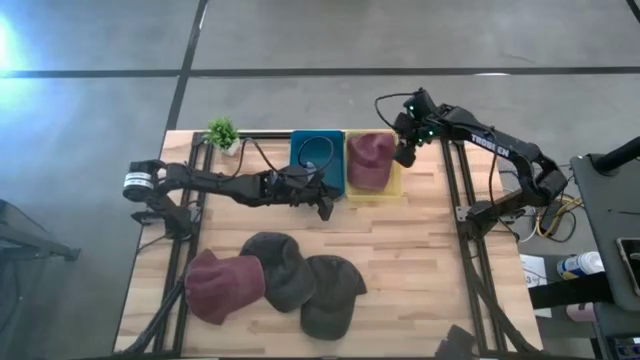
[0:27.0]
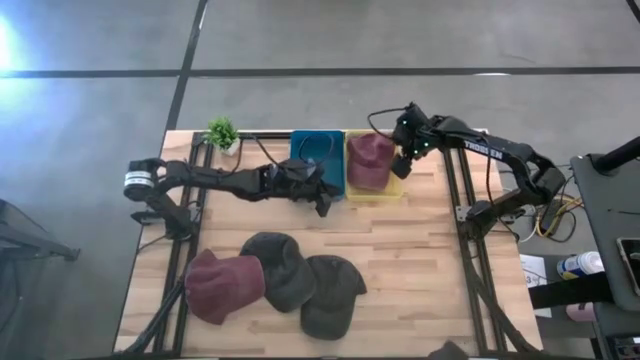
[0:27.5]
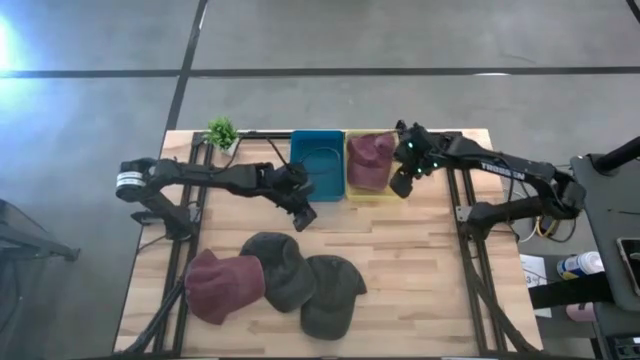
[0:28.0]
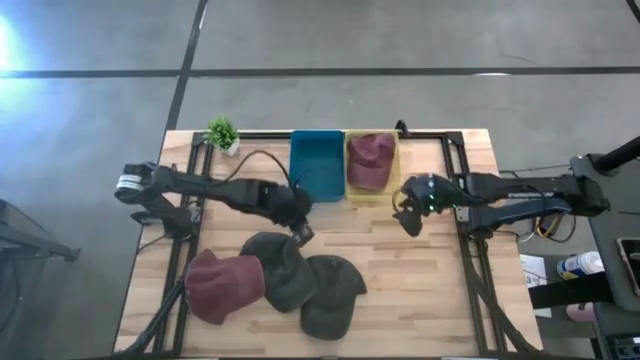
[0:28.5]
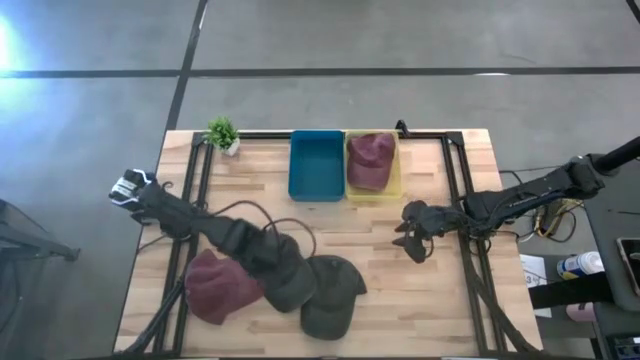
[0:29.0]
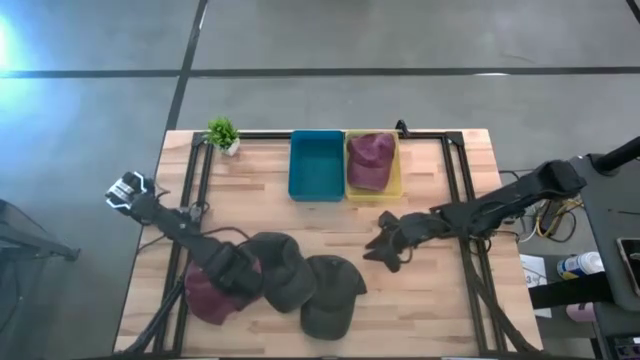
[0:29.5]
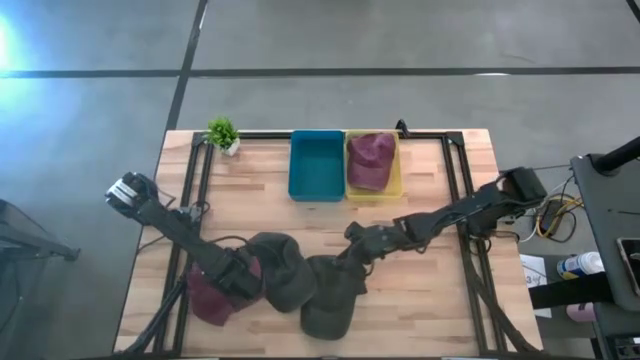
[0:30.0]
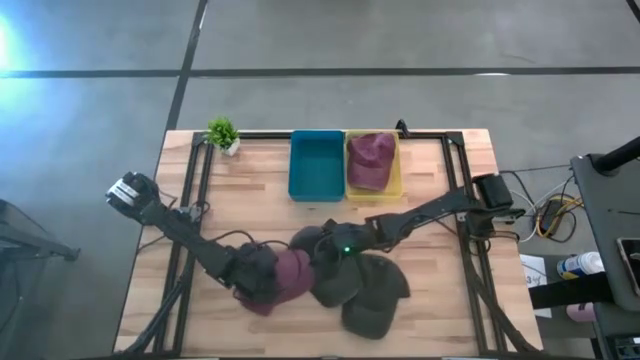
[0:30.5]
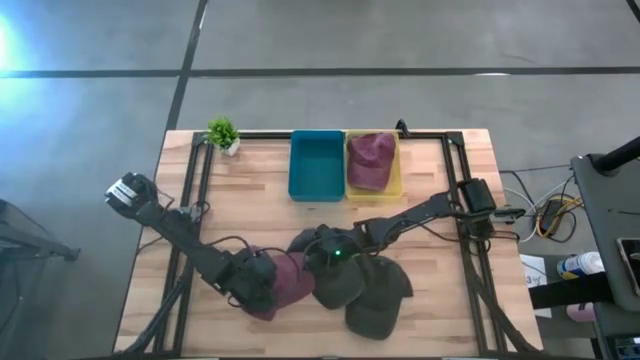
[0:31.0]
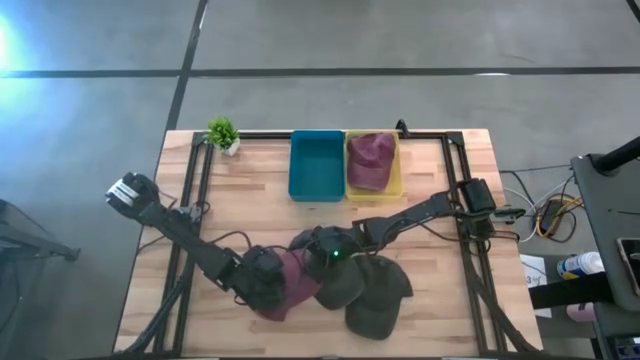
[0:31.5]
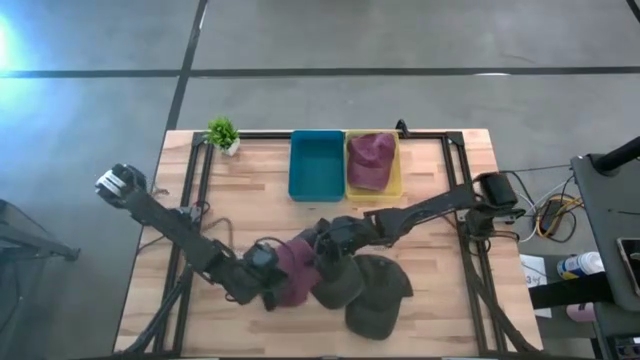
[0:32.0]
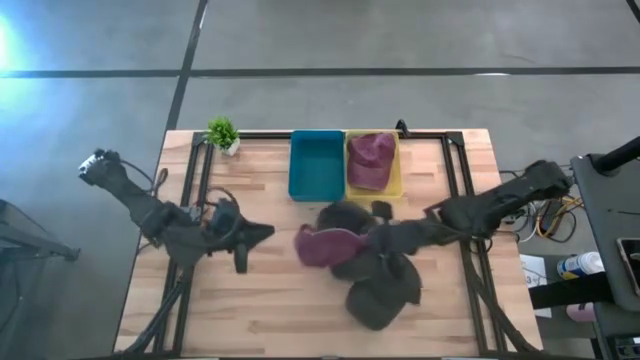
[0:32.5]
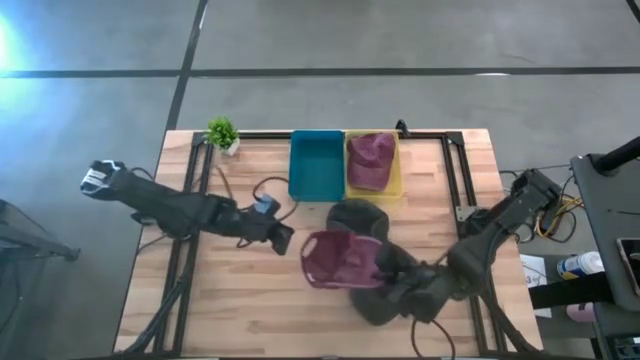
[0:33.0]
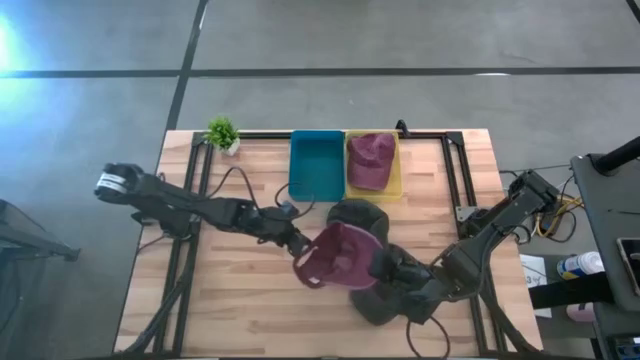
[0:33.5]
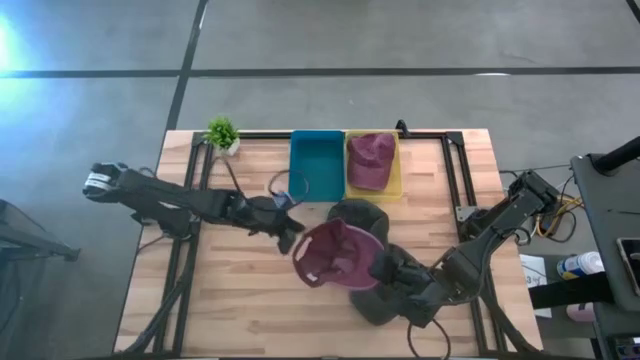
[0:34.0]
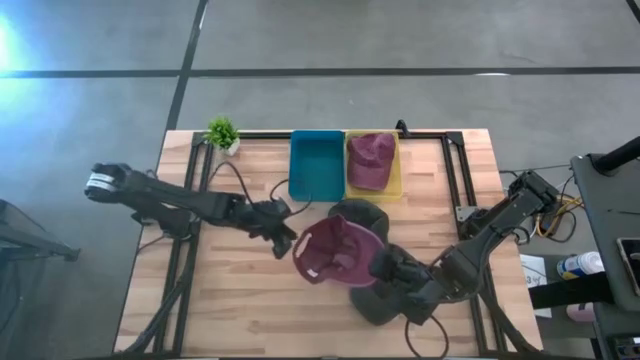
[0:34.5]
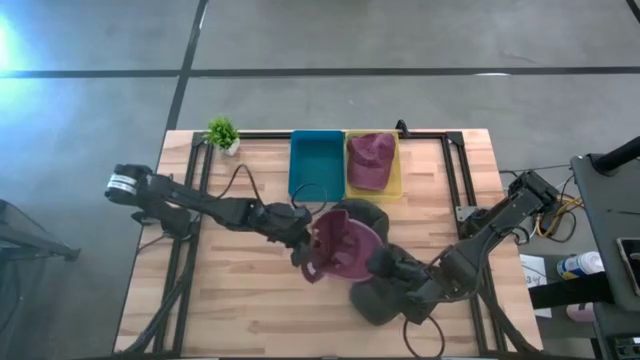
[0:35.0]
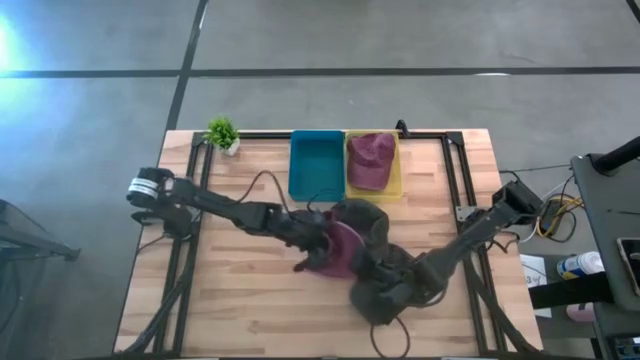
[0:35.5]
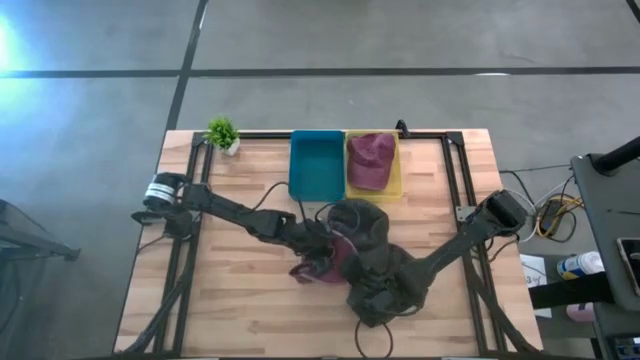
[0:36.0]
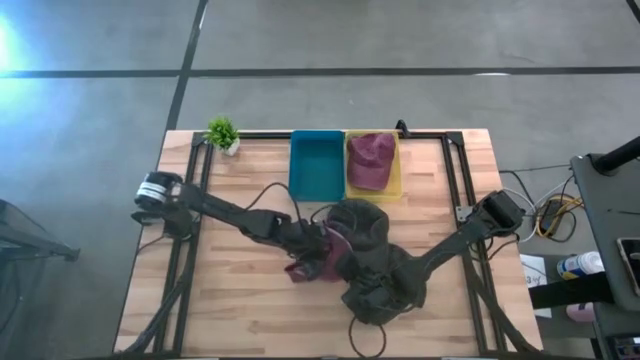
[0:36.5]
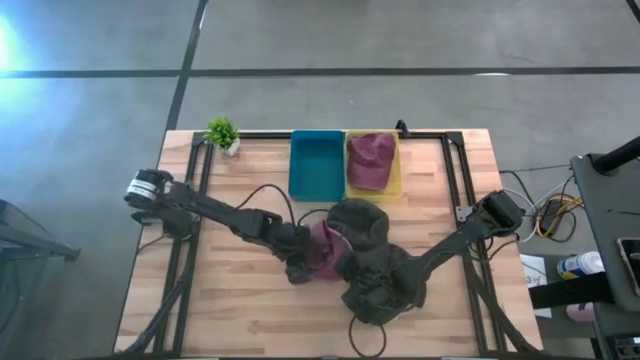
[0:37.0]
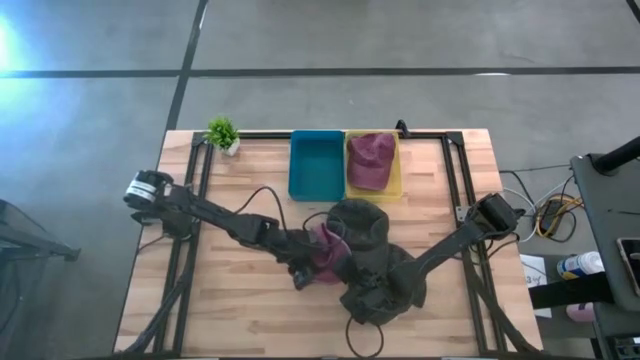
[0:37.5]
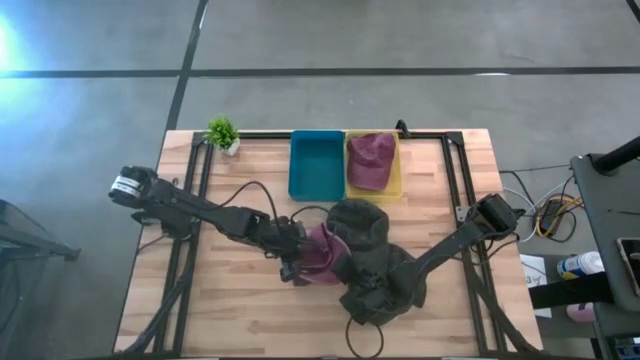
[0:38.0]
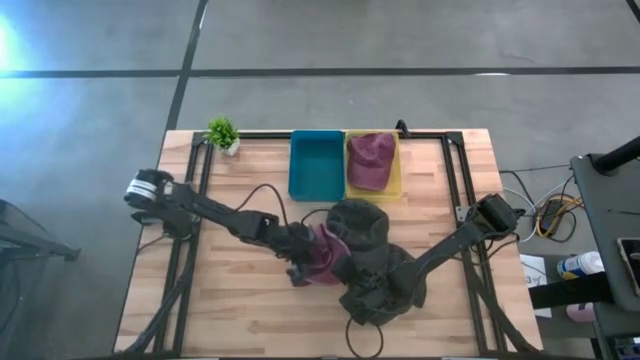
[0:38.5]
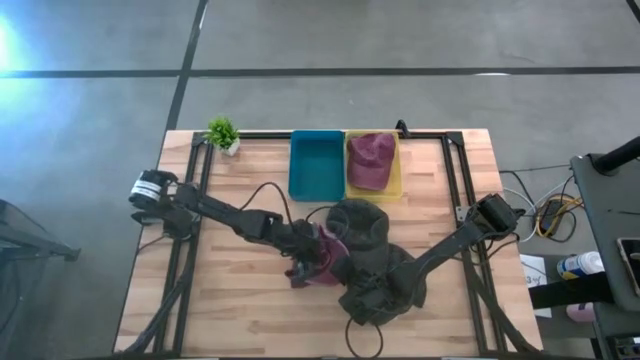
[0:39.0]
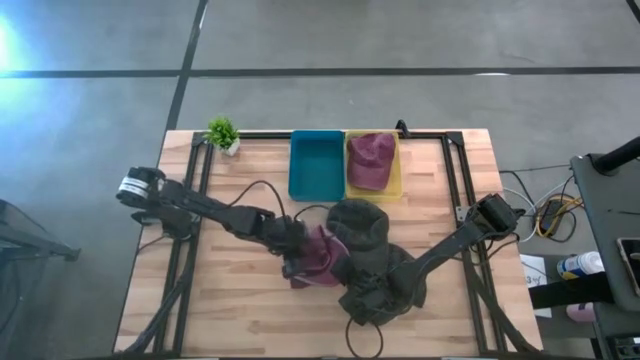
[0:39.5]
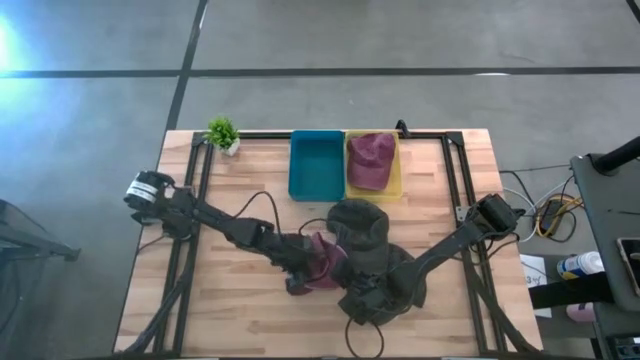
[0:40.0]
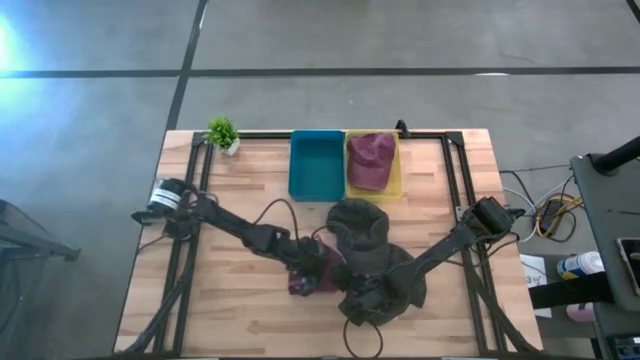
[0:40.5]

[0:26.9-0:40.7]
Task: Pick & Place hat
Put the red cap into the yellow bin

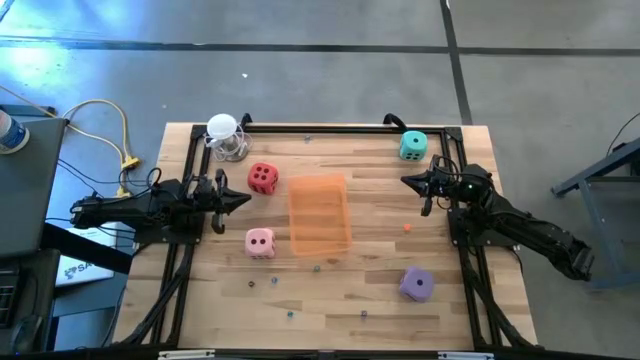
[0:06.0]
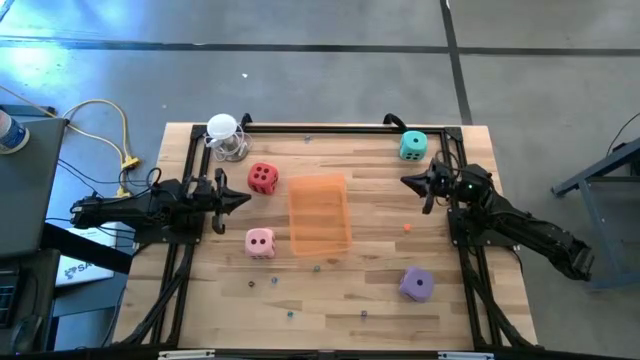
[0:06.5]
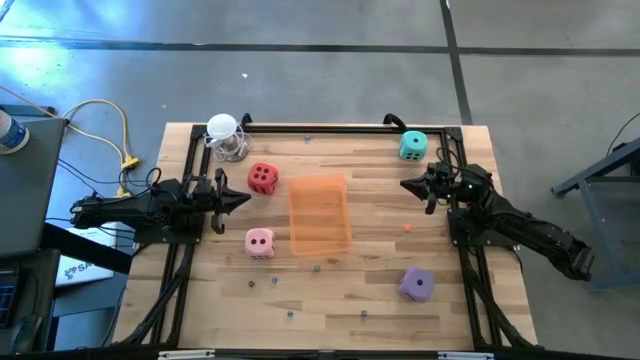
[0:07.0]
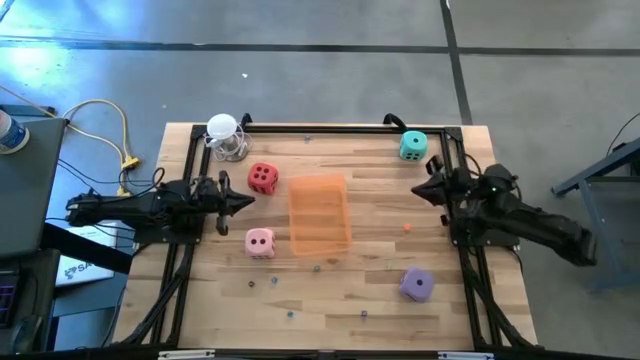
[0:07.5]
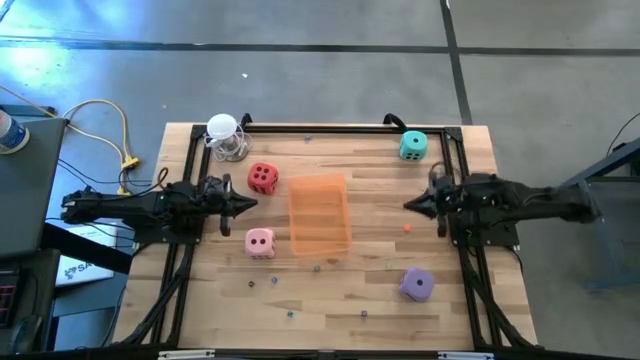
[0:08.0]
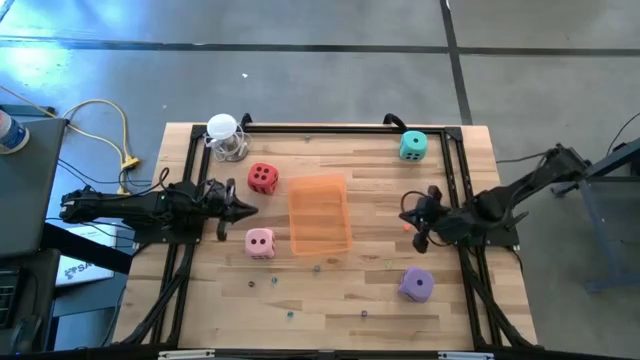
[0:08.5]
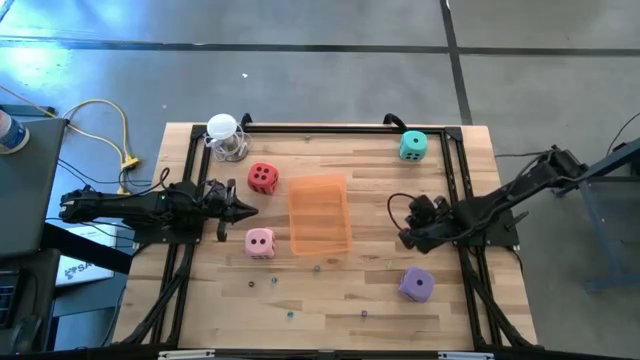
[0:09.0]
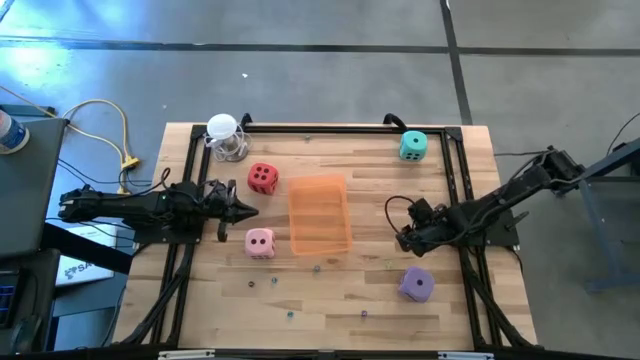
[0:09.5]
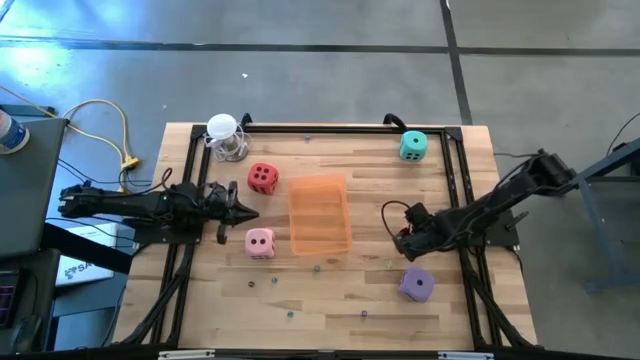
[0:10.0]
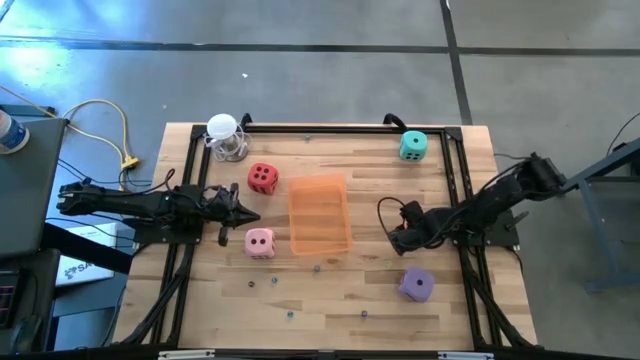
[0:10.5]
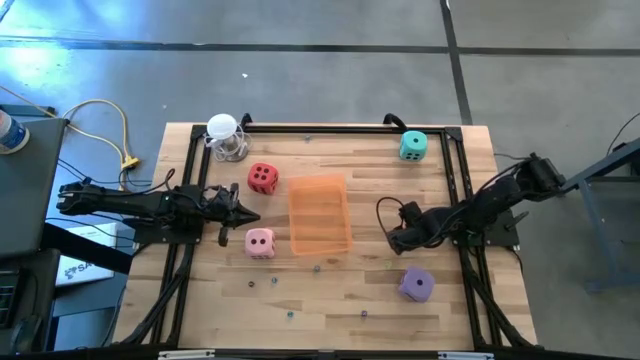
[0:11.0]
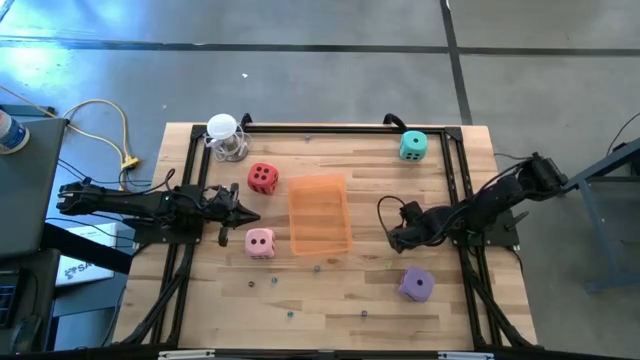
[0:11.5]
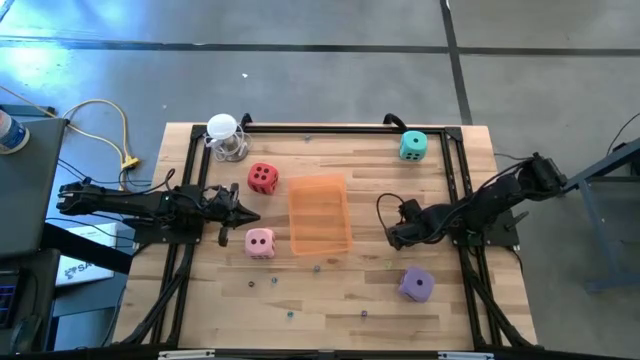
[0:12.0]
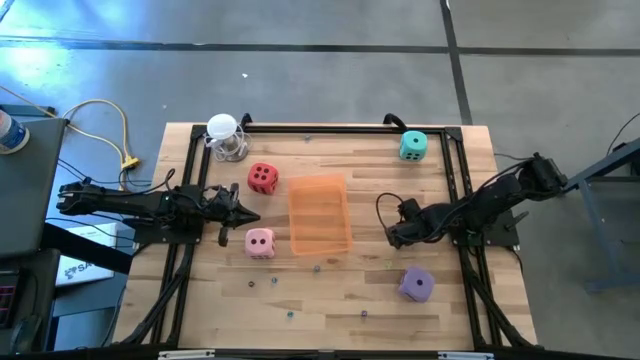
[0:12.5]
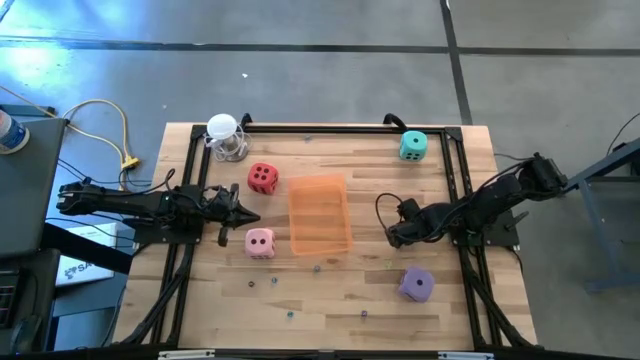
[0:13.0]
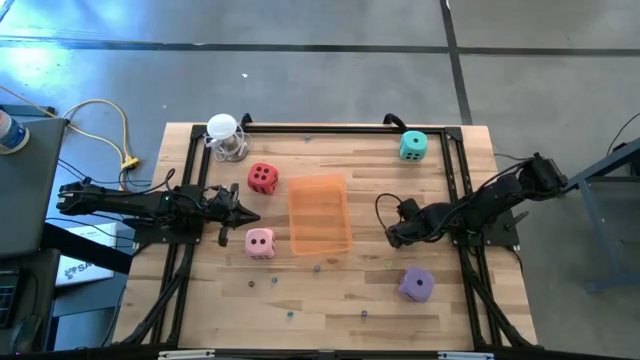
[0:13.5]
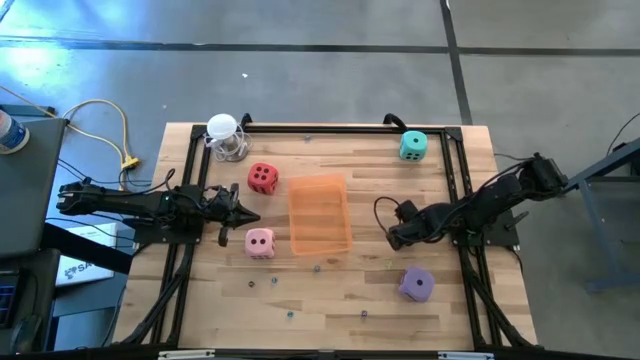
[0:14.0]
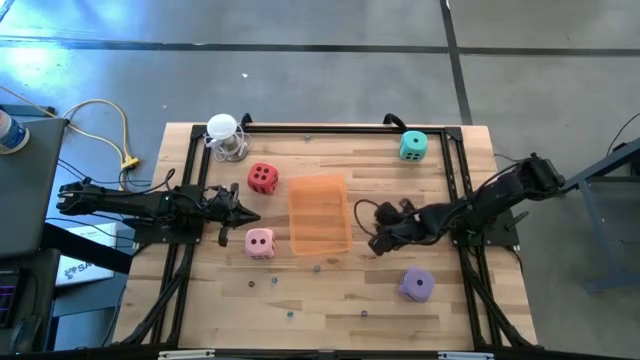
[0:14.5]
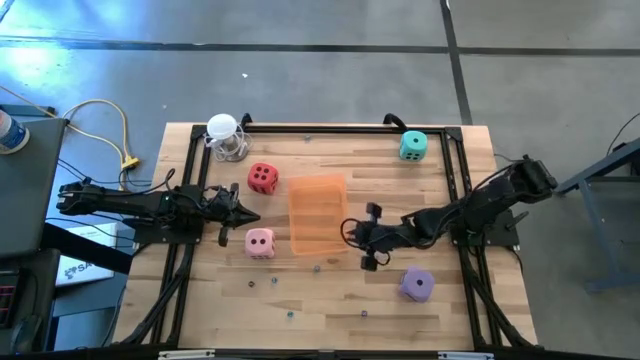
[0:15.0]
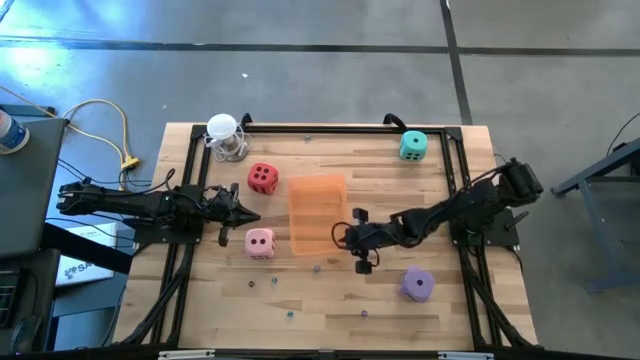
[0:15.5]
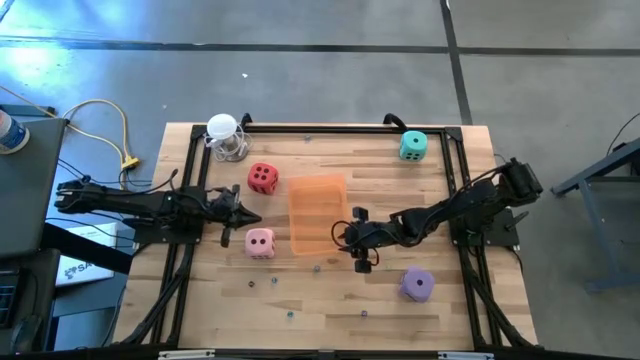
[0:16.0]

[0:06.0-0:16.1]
Task: Pick & Place Dice
Put the small orange die into the orange bin
